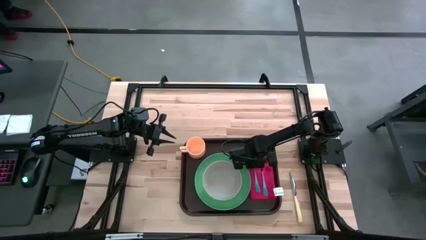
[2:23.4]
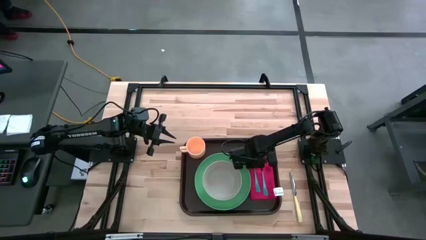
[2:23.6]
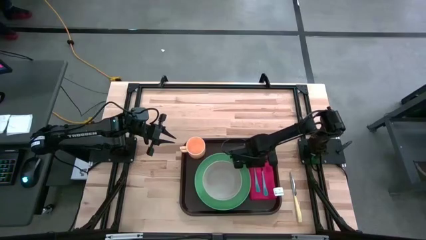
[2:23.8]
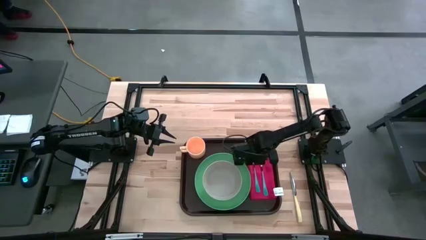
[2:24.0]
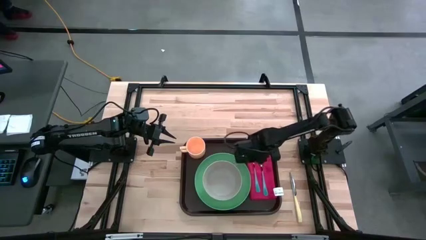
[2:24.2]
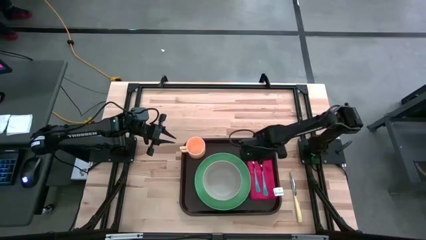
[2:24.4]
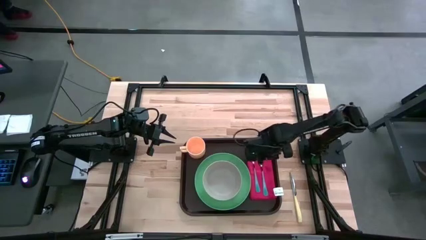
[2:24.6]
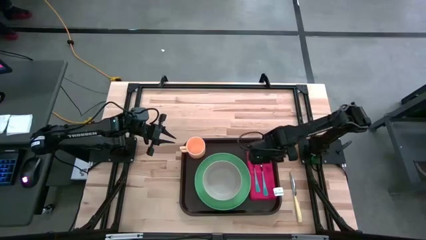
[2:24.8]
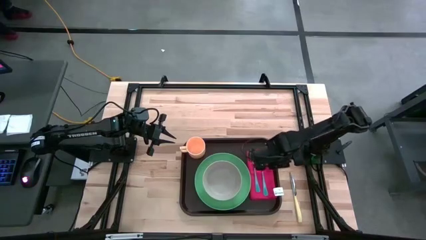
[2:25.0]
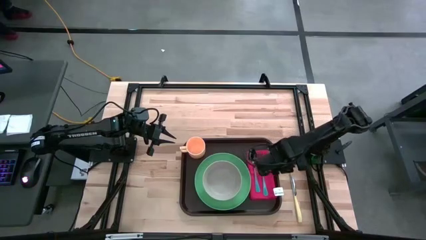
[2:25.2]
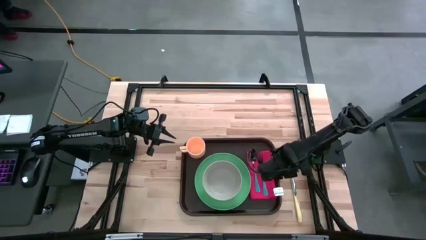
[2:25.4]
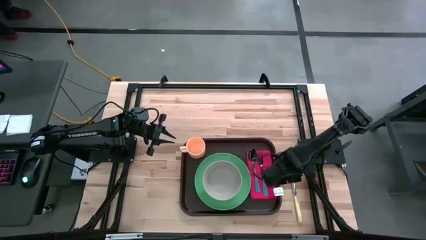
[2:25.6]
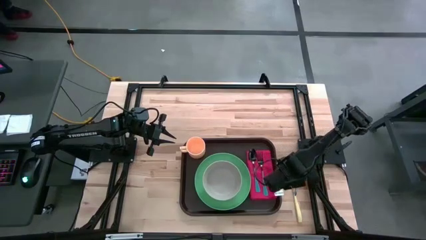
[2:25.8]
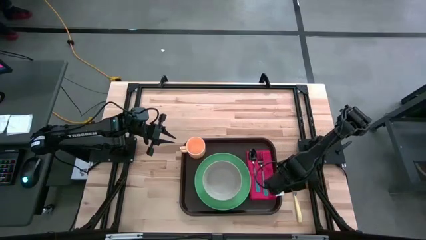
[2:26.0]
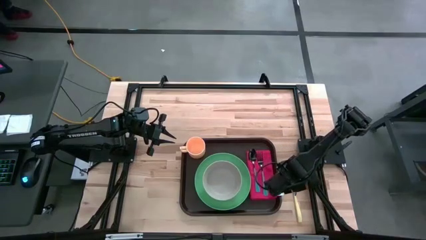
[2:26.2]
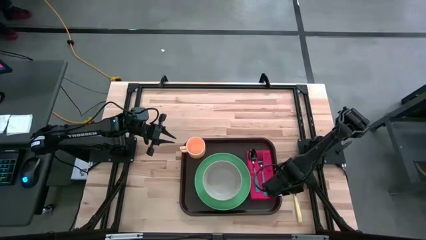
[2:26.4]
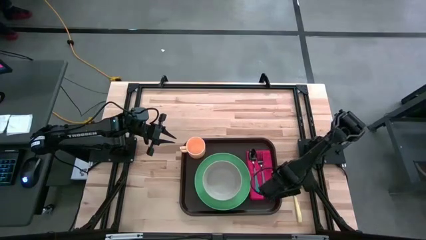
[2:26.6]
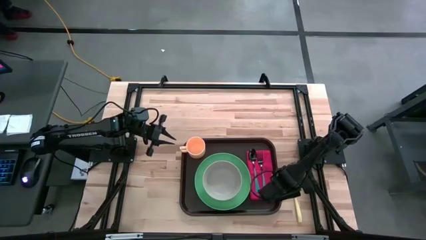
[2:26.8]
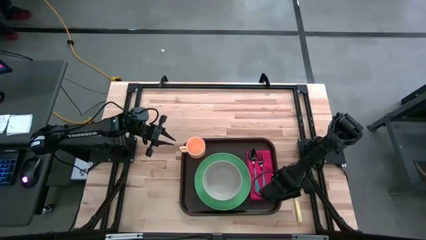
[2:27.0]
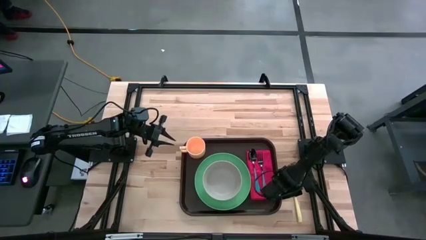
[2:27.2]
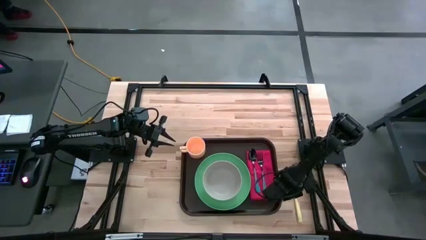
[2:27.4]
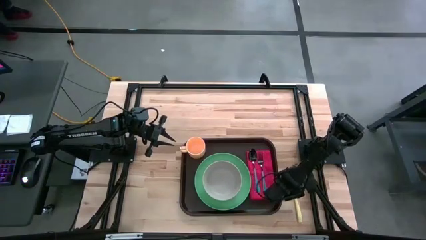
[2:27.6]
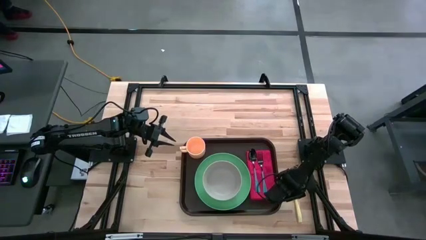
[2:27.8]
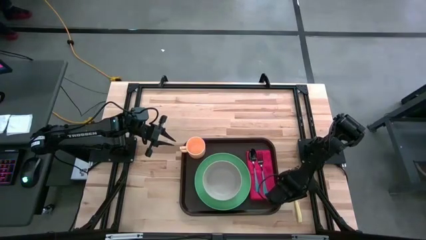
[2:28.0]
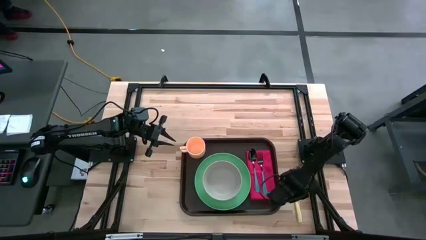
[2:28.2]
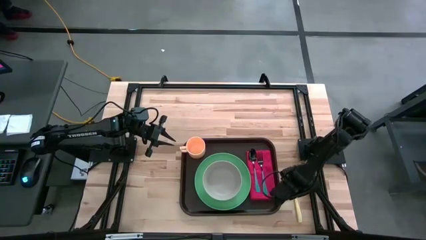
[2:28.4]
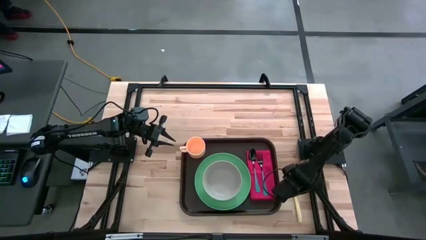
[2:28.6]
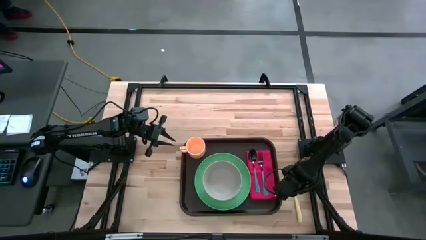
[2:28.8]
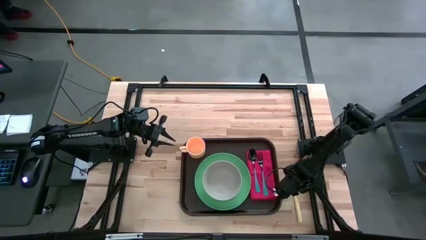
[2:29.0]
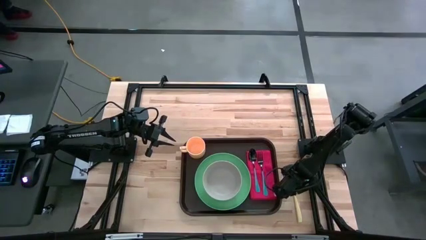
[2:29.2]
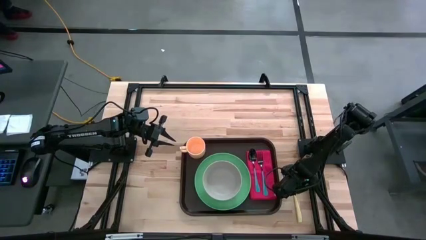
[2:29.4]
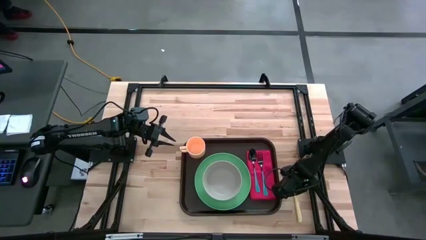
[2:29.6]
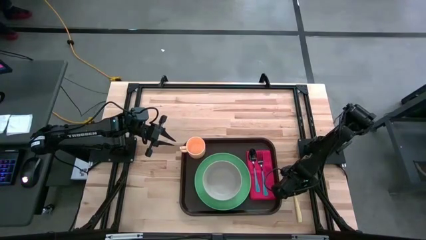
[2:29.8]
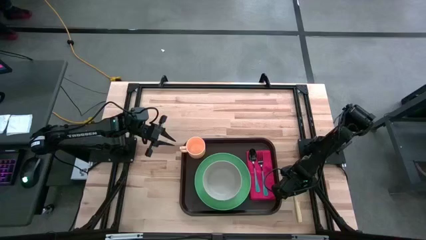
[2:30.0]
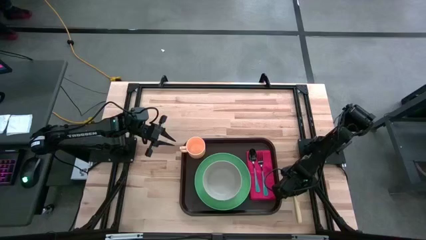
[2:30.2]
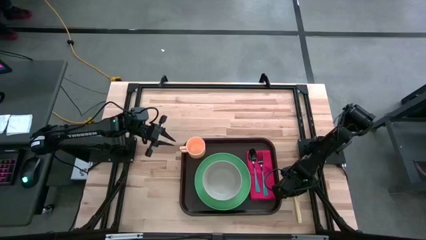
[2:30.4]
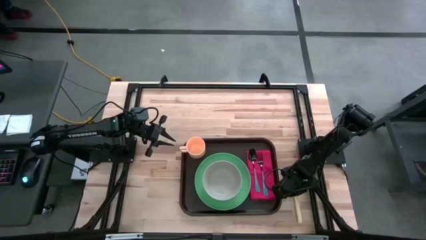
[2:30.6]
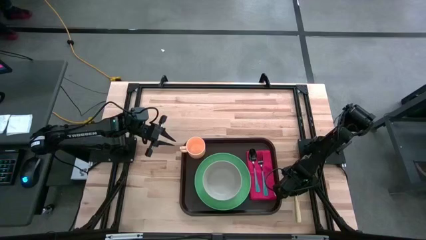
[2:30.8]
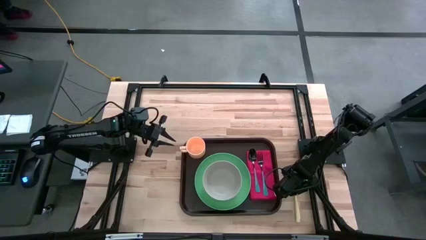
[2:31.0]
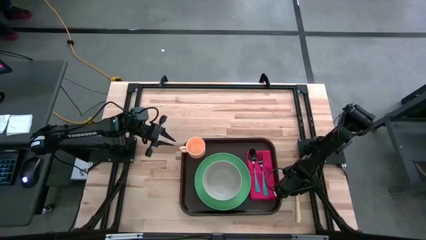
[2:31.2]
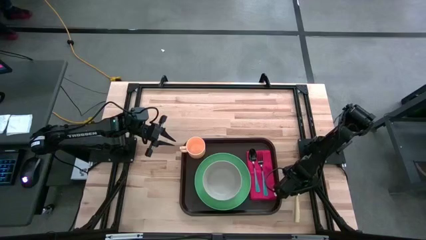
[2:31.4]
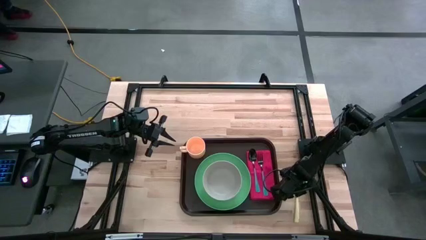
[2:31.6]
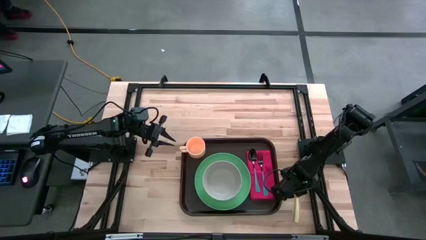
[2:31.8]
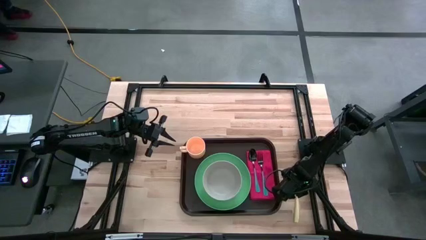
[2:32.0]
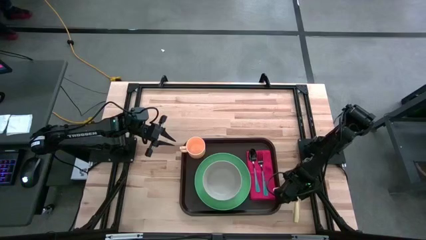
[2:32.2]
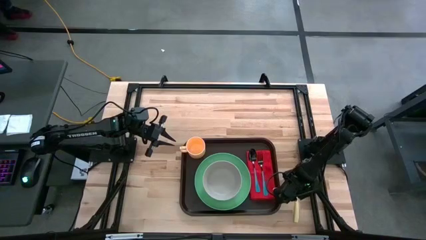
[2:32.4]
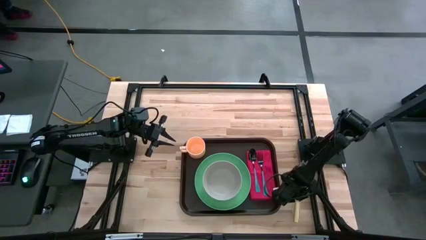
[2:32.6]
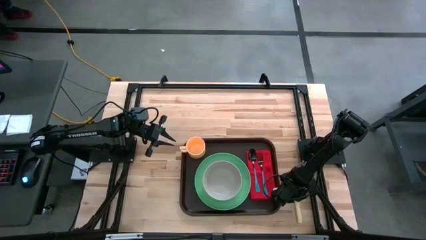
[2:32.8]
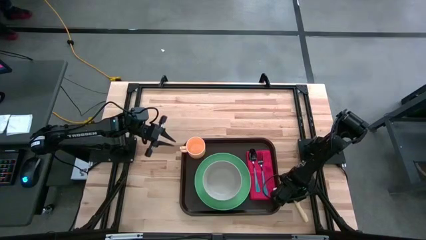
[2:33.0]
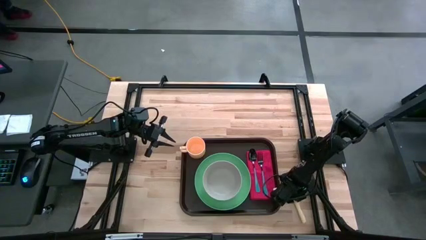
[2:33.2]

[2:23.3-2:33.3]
Task: Set up tray
Put the yellow table knife on the right of the blue fork on the brown serving tray

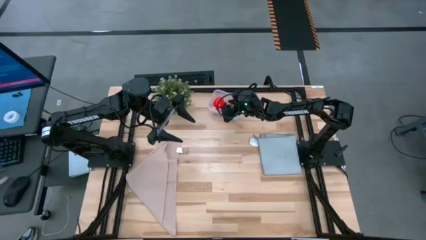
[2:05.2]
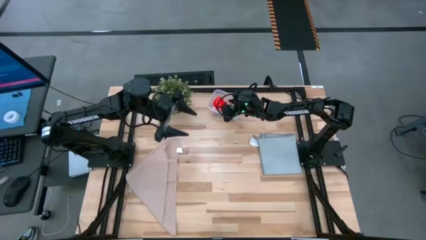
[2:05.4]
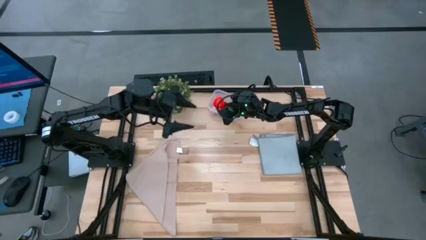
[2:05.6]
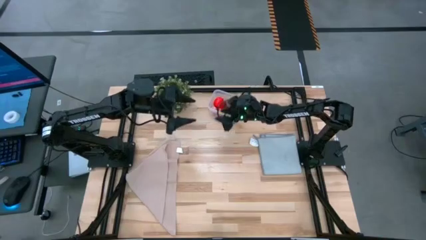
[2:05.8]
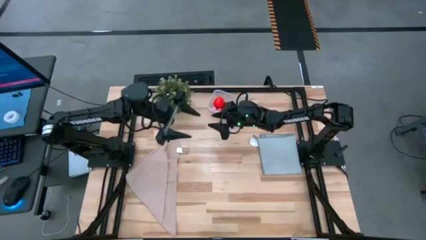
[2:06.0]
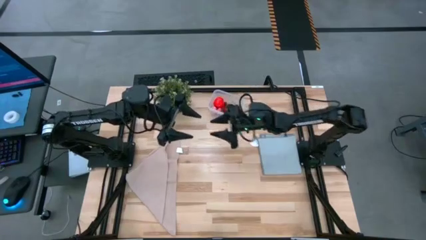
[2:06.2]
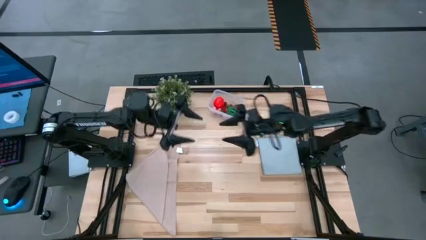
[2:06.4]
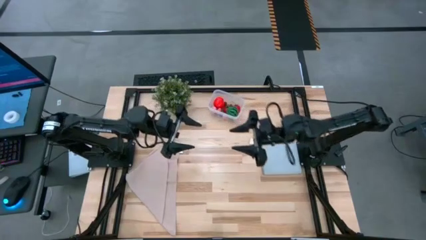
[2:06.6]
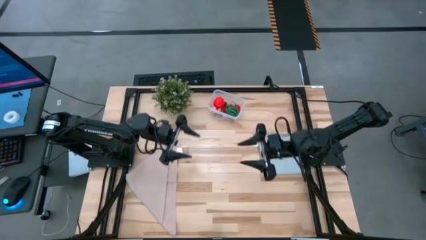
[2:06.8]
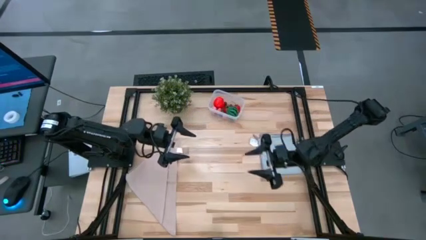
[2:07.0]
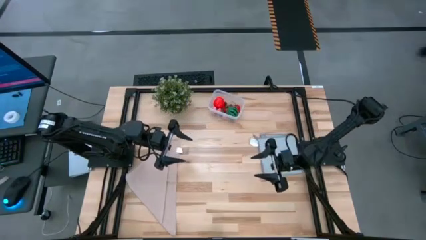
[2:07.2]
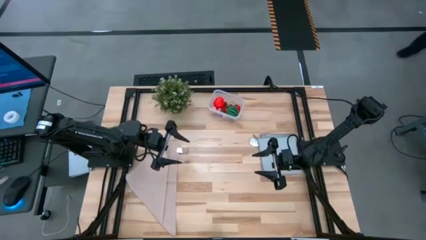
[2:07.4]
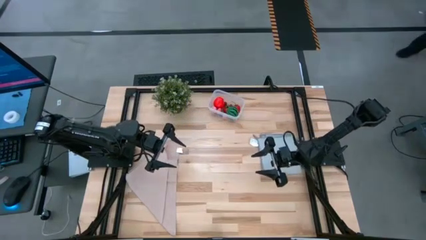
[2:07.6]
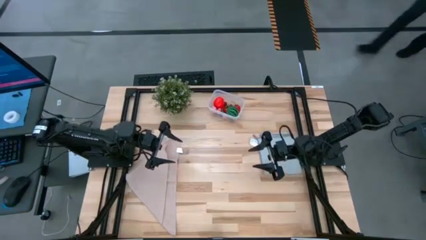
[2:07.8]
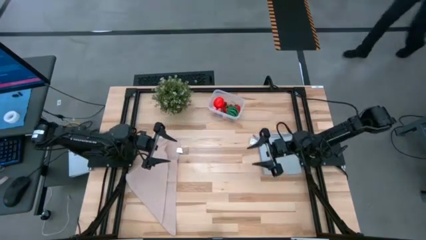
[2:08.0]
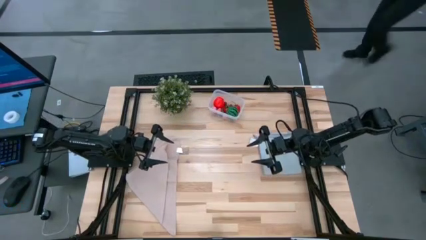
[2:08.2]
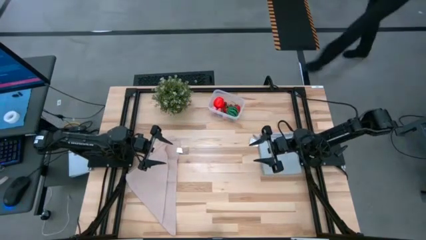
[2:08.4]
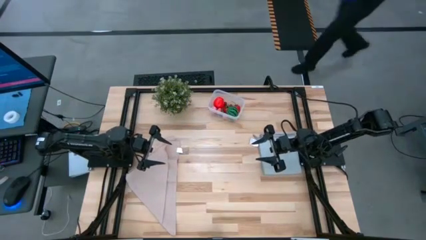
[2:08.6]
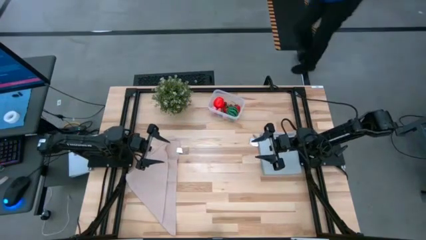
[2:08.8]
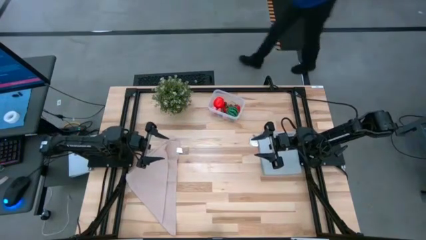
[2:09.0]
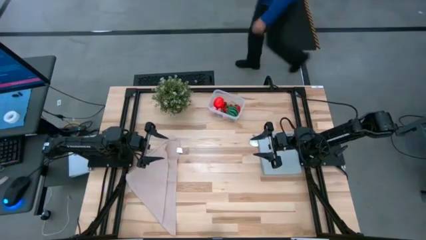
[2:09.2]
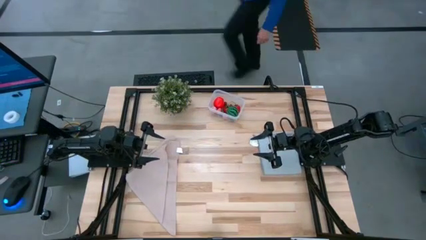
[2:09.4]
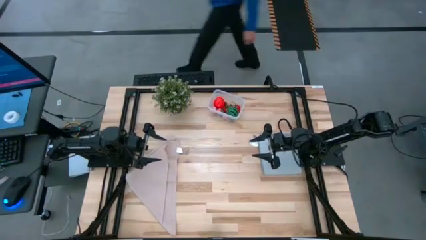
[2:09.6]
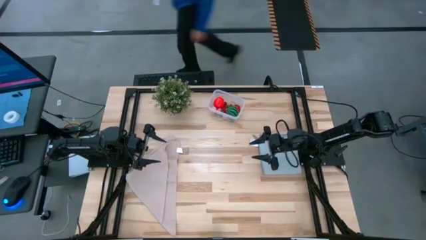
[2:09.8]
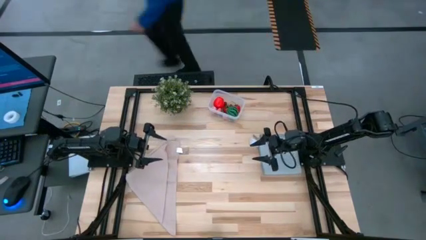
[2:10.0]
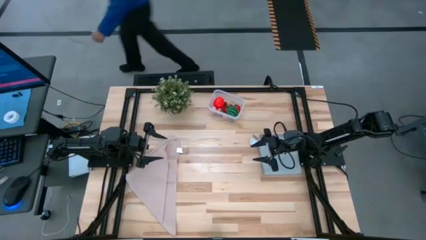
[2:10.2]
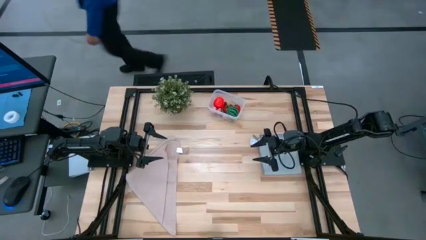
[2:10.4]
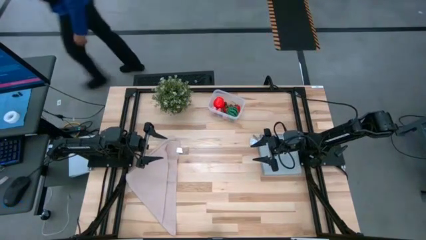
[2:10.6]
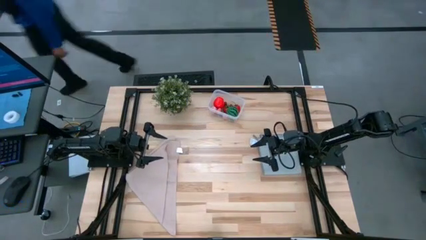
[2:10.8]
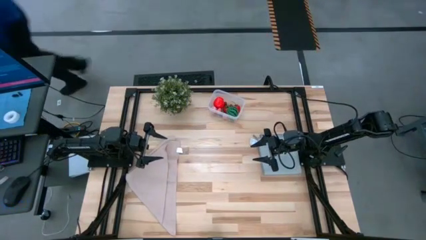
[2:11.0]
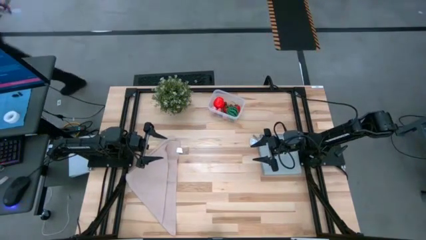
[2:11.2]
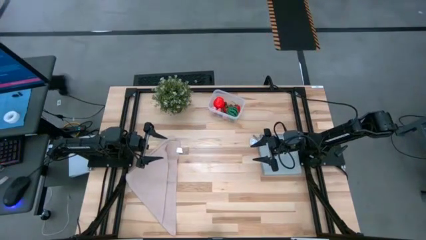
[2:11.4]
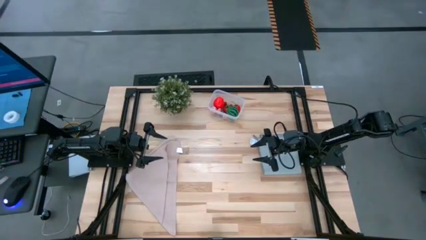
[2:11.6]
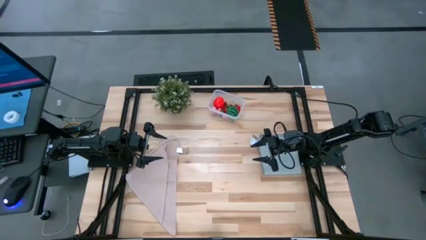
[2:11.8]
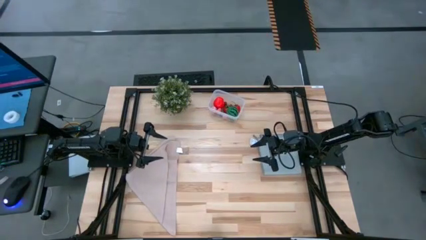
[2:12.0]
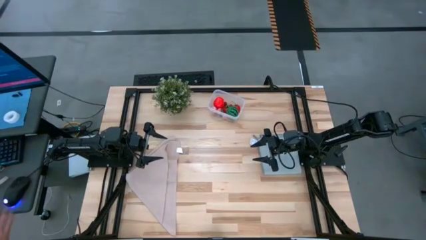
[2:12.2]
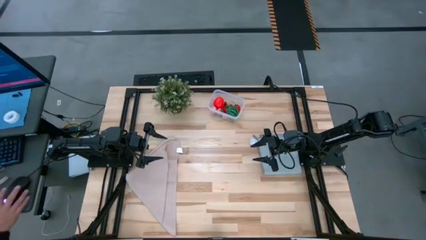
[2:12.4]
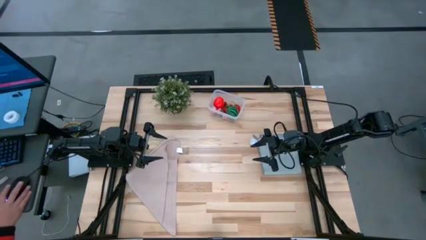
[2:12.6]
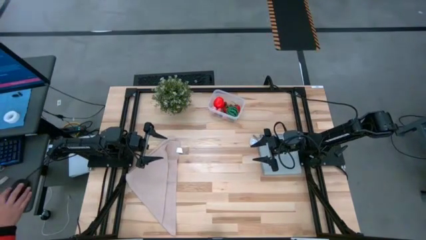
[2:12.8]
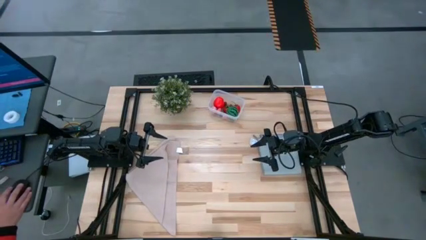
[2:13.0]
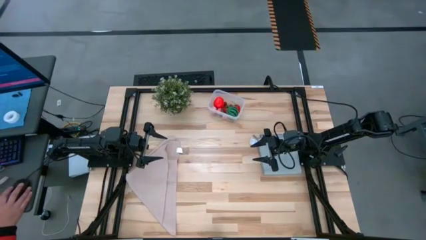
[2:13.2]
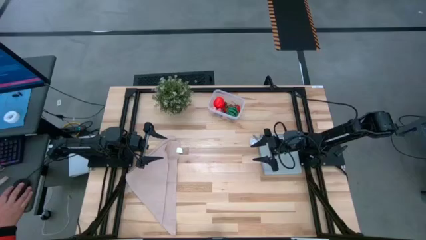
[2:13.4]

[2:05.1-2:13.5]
Task: Pick and placing Produce into tupperware
Return to Home Position
